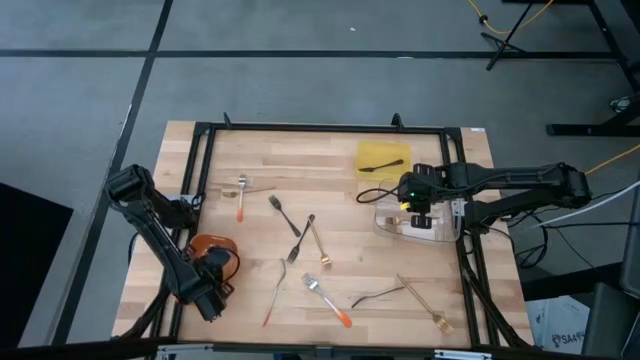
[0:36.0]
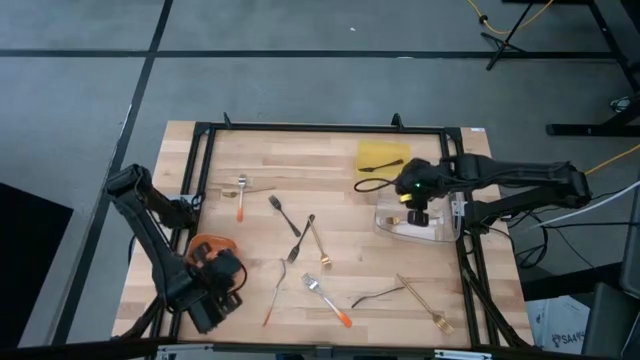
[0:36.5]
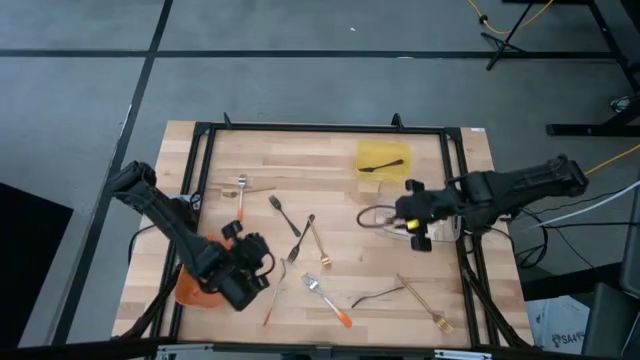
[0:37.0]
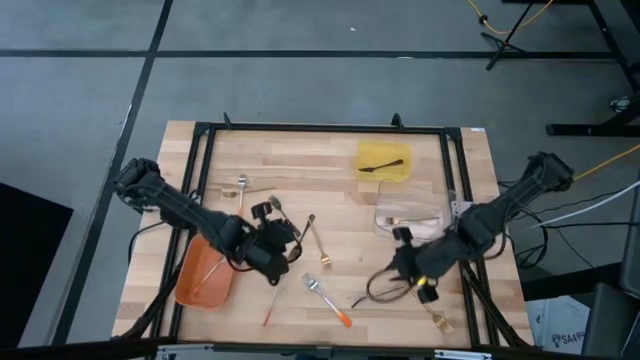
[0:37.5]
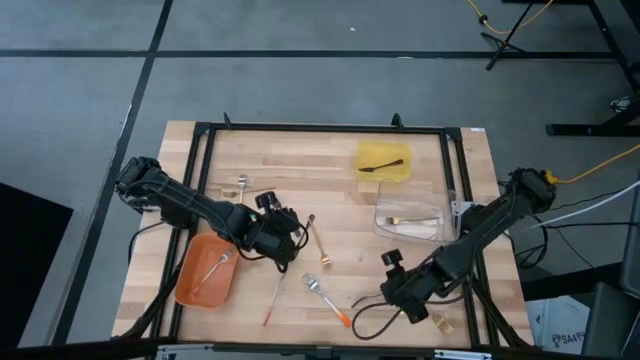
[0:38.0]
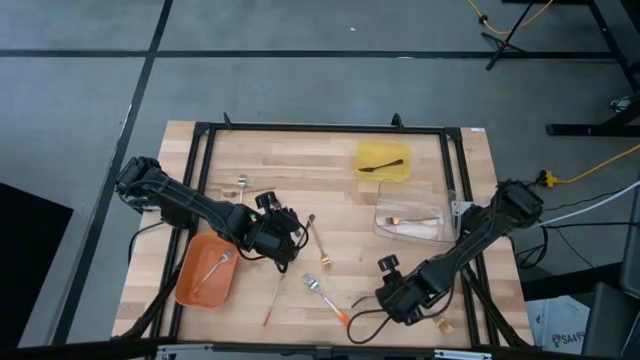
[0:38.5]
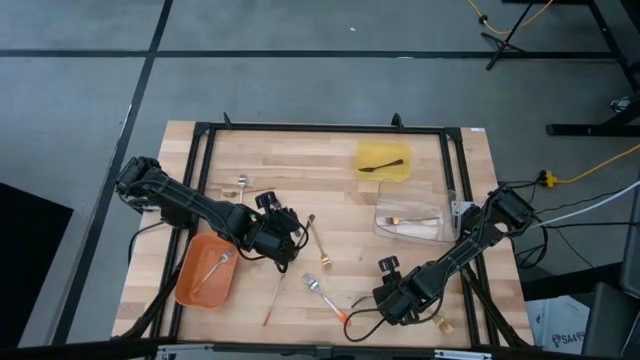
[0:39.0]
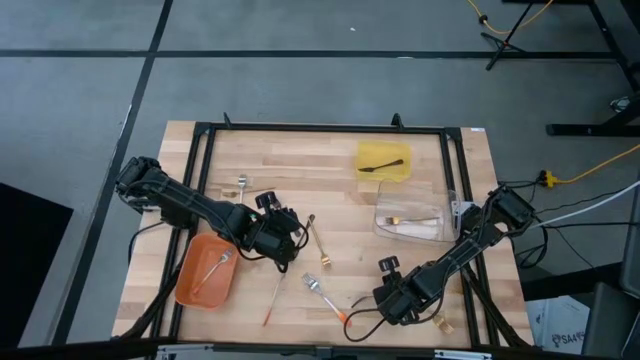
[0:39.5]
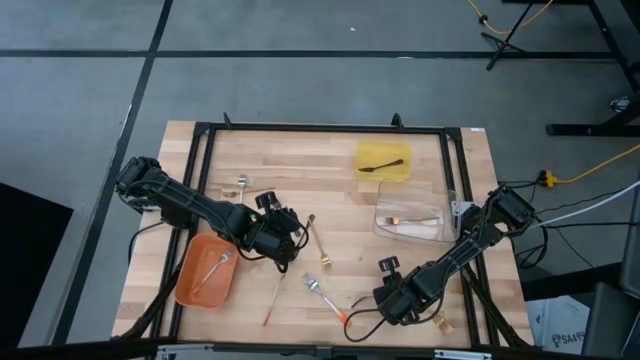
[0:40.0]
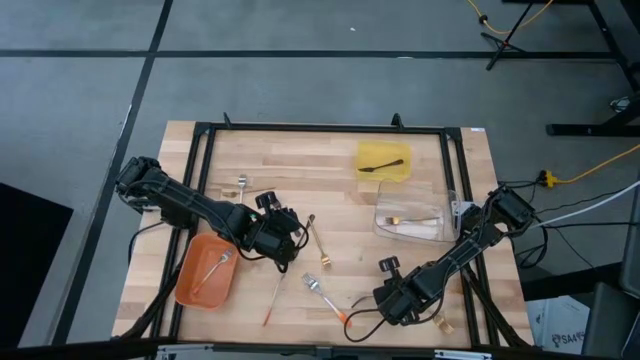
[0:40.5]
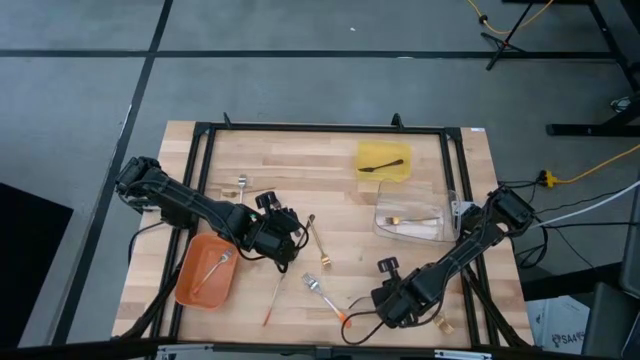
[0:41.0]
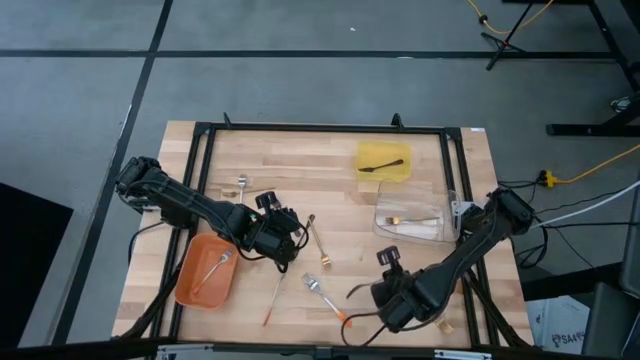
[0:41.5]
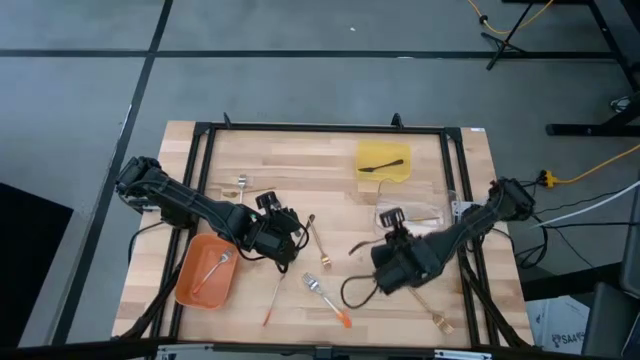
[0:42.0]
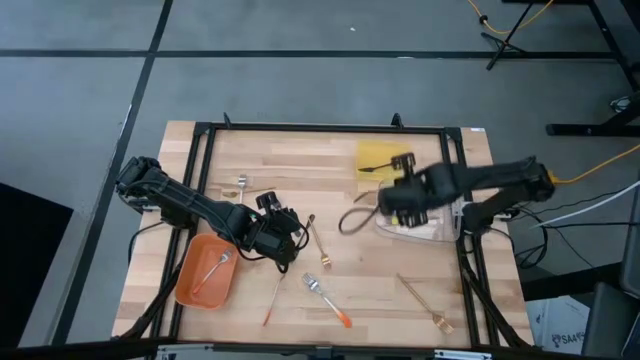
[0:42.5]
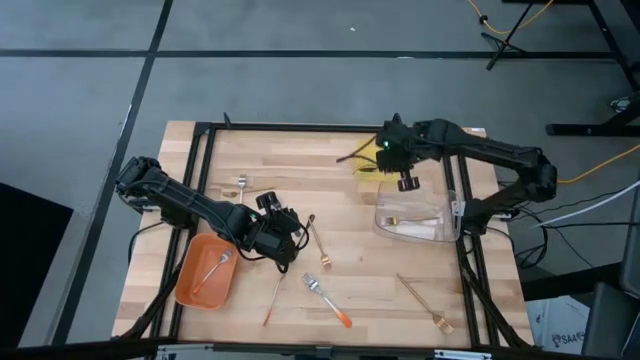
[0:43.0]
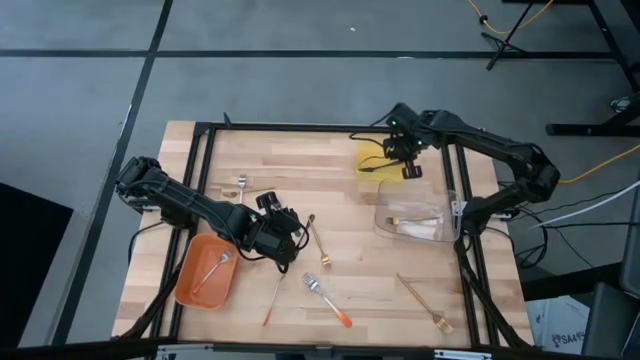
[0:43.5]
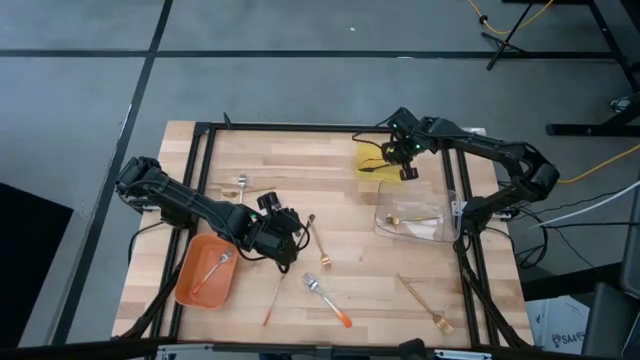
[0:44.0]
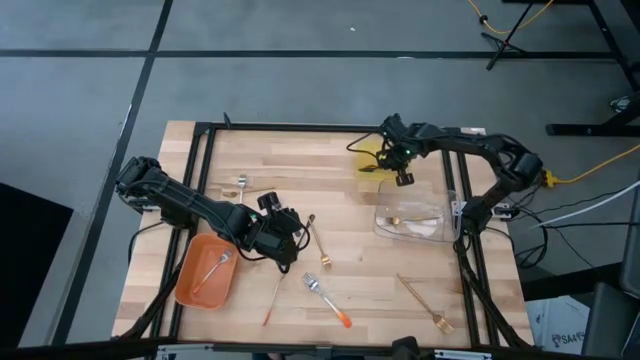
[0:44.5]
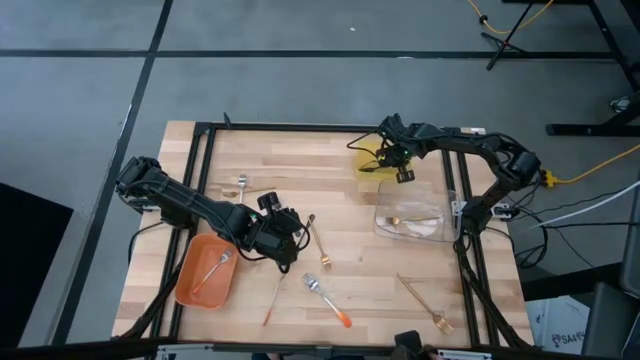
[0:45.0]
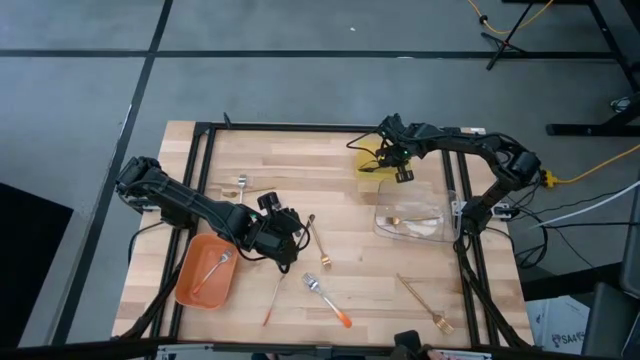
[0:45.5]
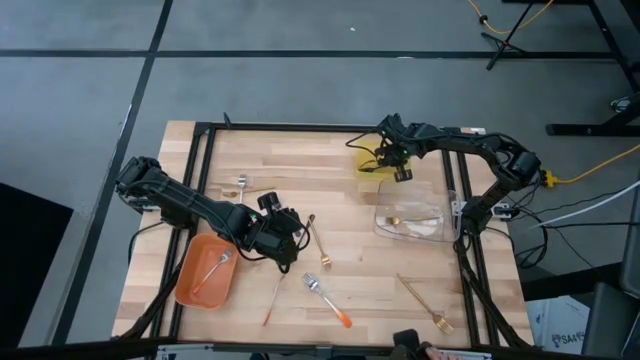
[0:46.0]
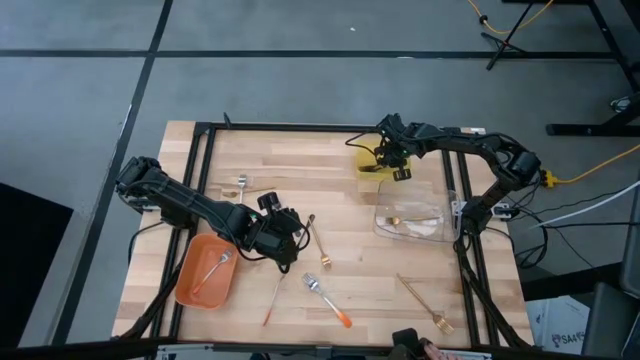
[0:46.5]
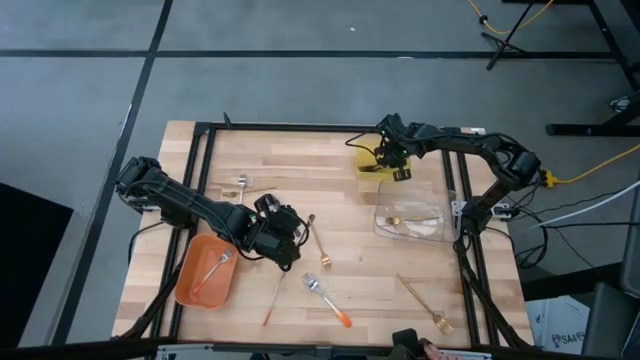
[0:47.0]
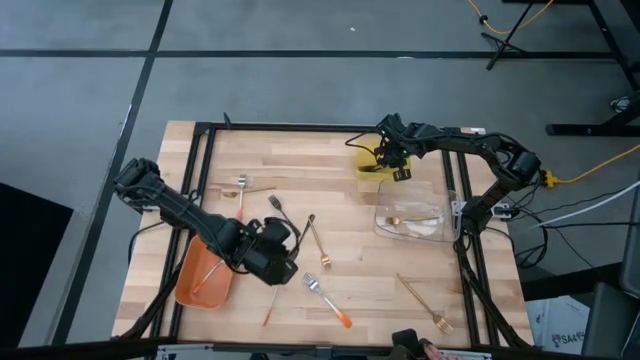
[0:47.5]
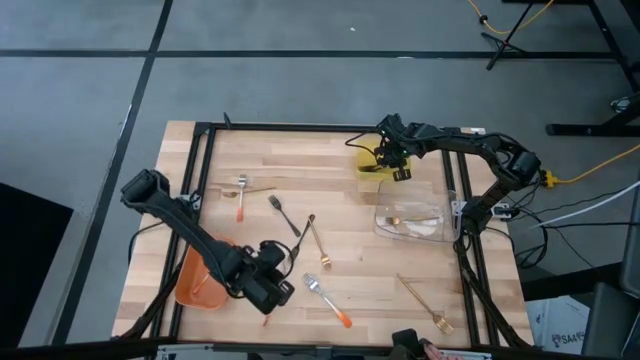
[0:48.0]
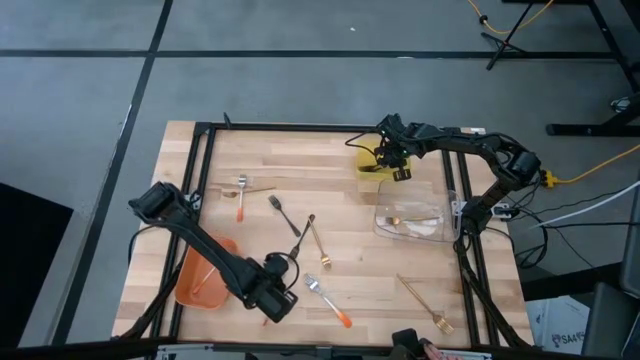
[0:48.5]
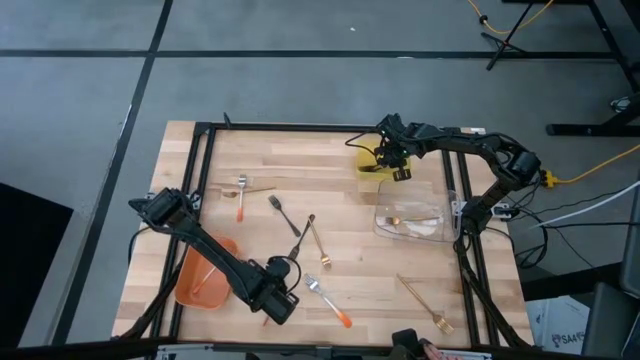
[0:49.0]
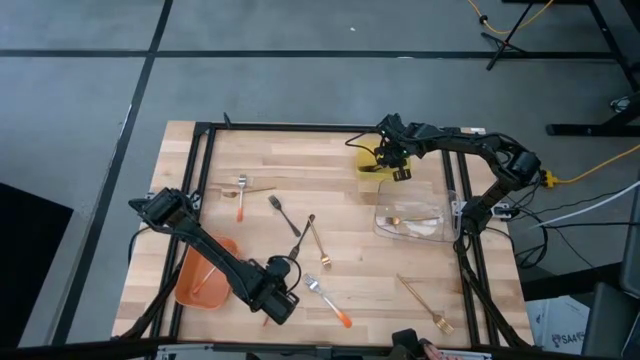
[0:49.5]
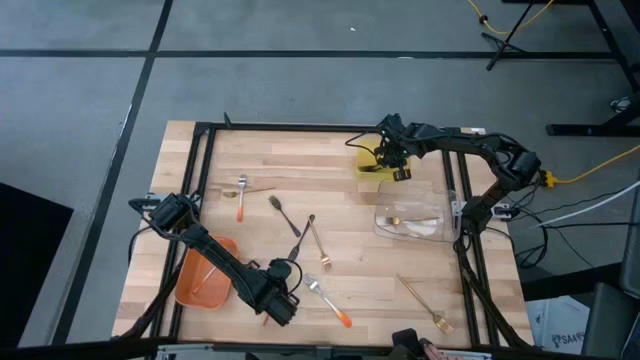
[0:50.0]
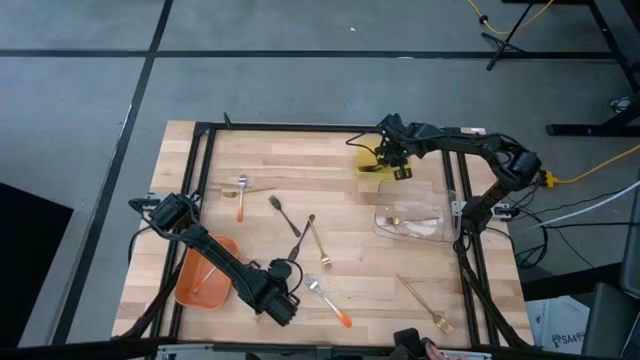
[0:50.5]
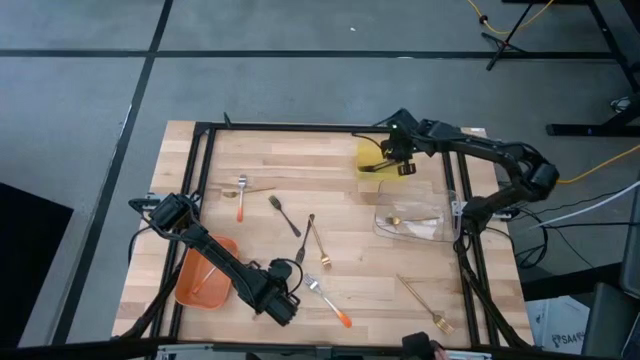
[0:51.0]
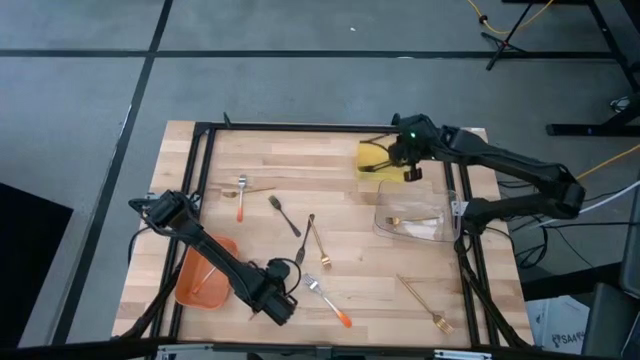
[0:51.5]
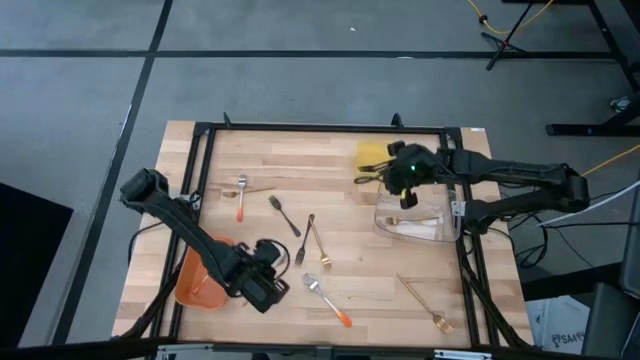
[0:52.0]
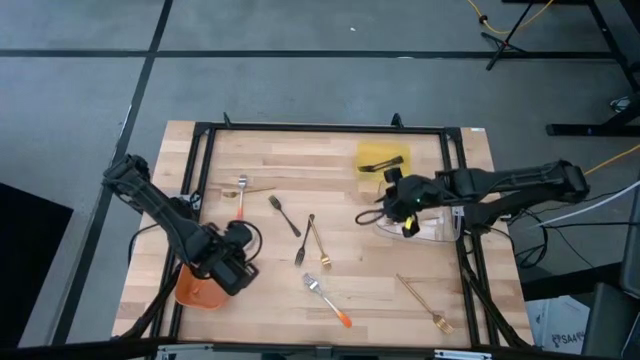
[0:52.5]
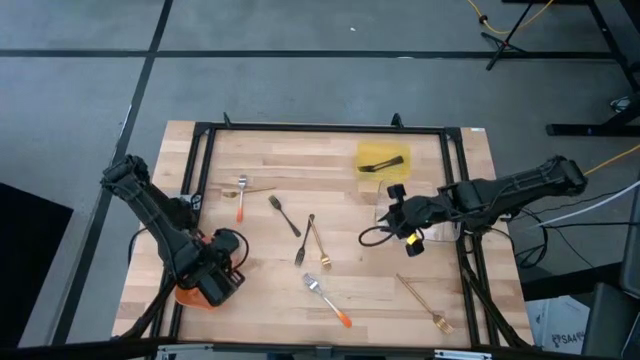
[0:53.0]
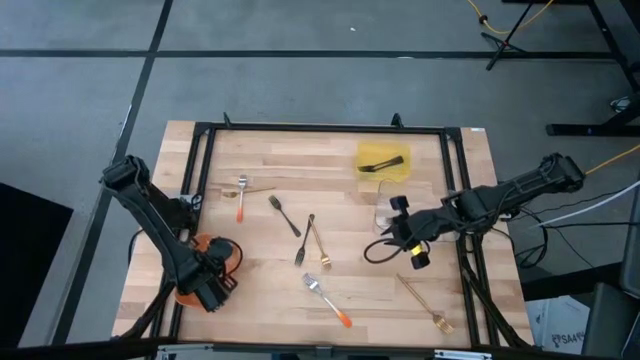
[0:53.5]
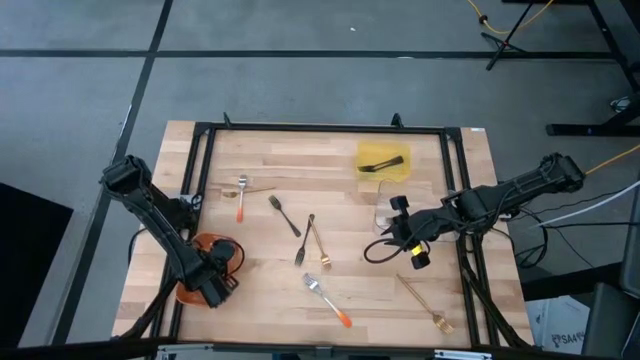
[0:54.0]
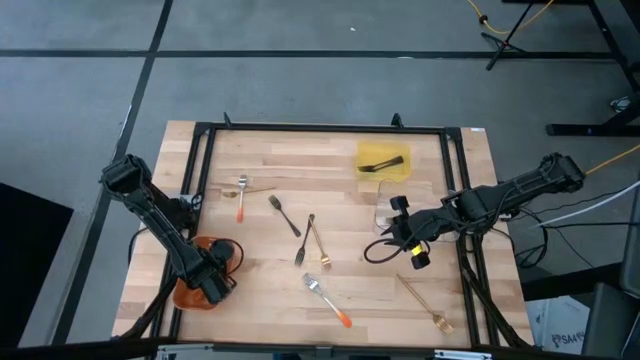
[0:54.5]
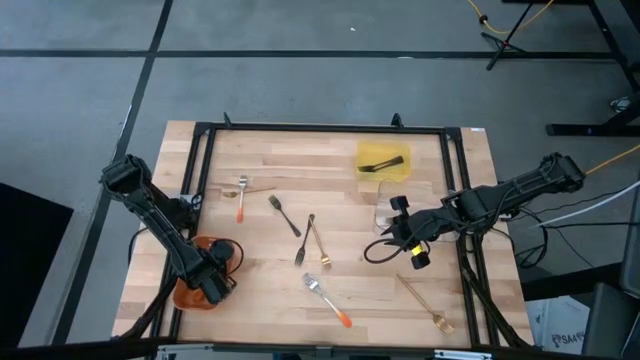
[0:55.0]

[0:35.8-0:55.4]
Task: Sort silverware by color (type)
Put the black fork into the yellow bin

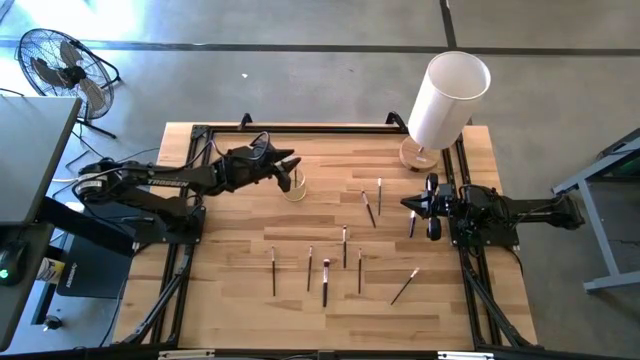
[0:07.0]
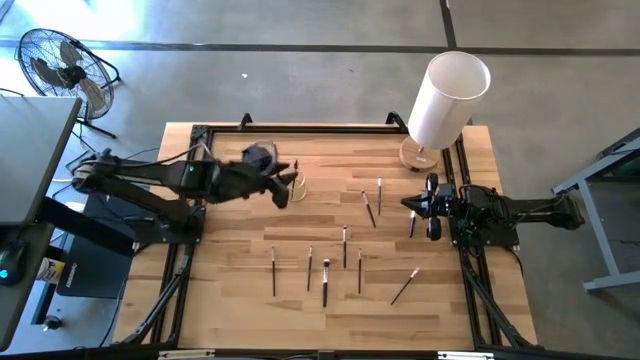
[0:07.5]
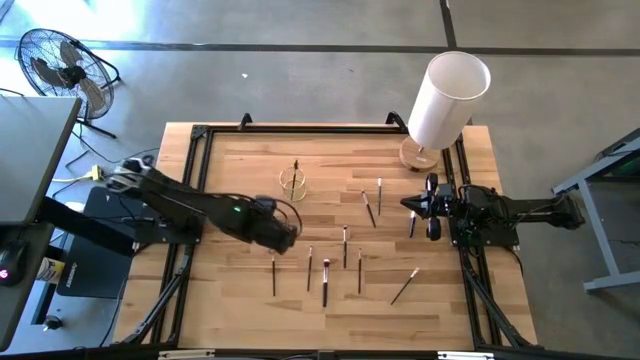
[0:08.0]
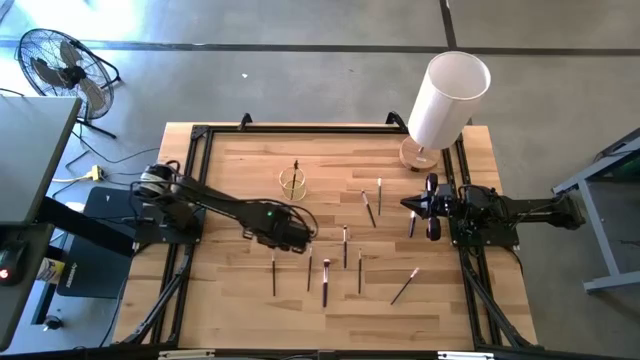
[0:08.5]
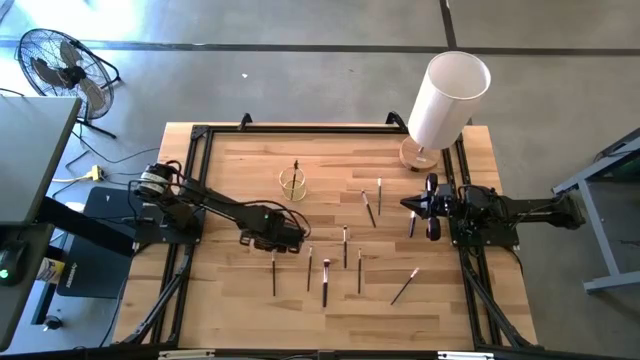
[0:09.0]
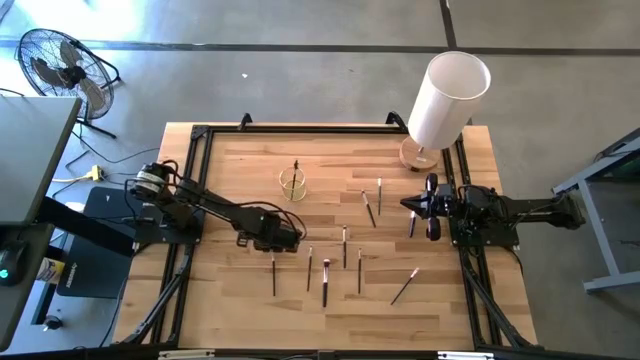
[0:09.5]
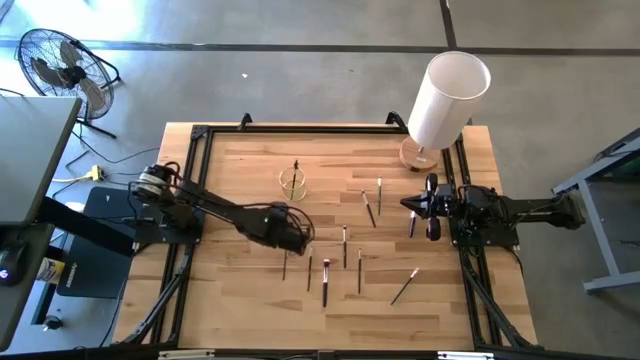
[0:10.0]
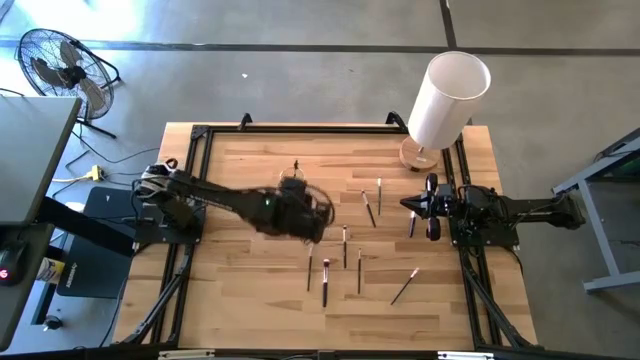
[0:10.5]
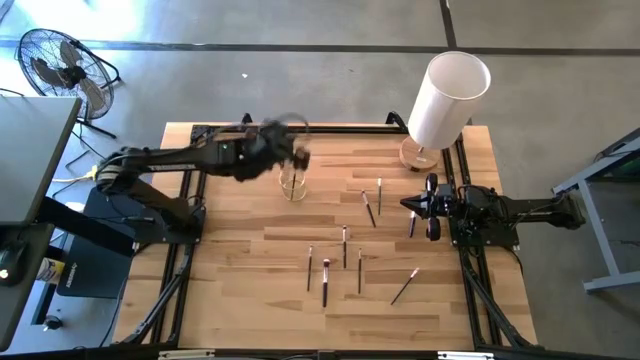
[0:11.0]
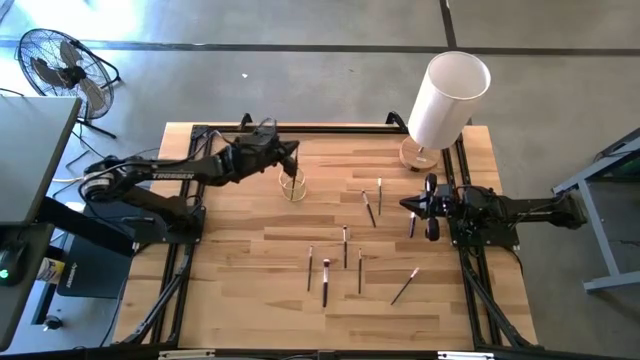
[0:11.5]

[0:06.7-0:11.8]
Task: Put items in baskets/containers
Put the makeup brush into the wire organizer
